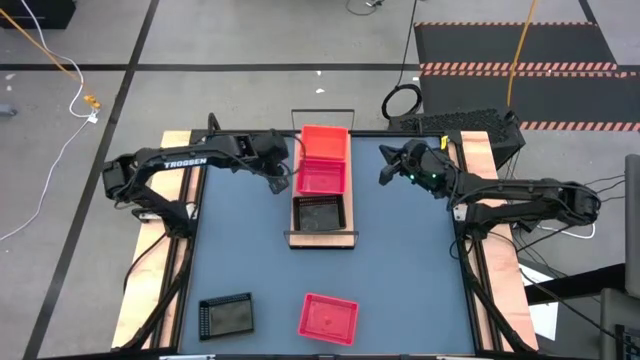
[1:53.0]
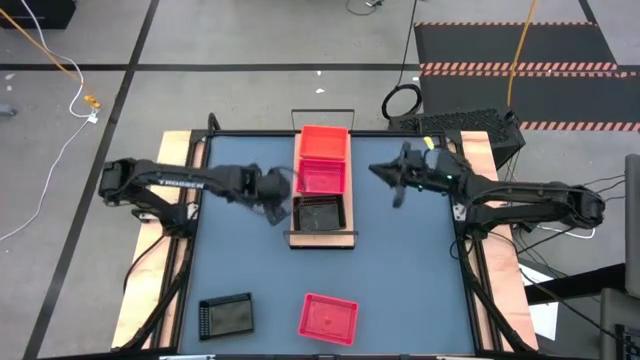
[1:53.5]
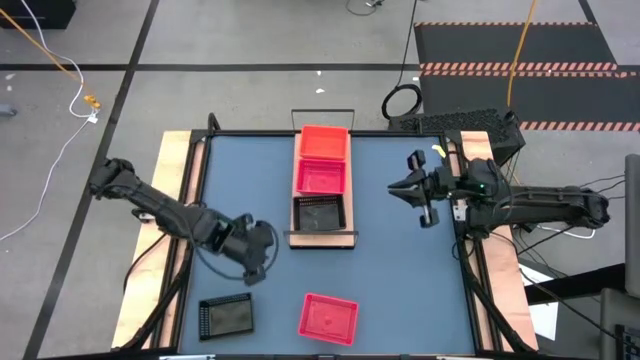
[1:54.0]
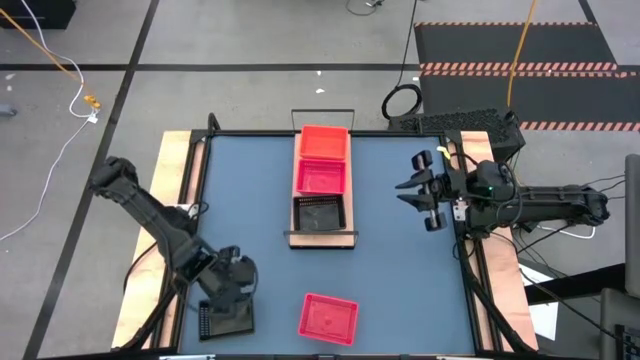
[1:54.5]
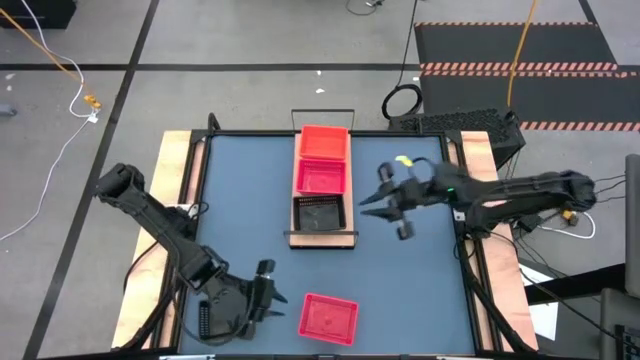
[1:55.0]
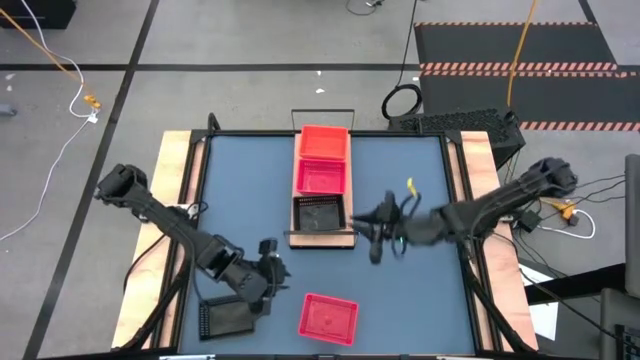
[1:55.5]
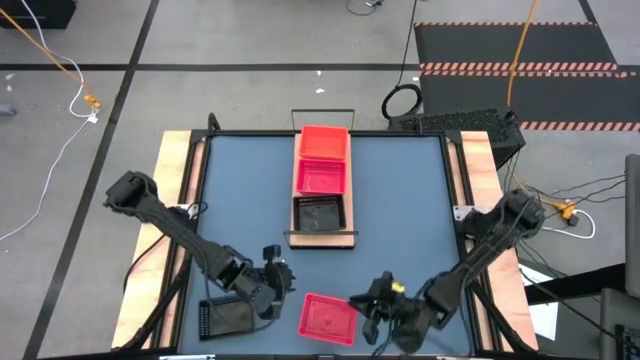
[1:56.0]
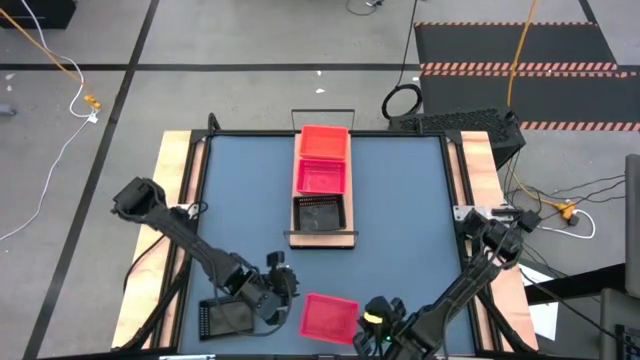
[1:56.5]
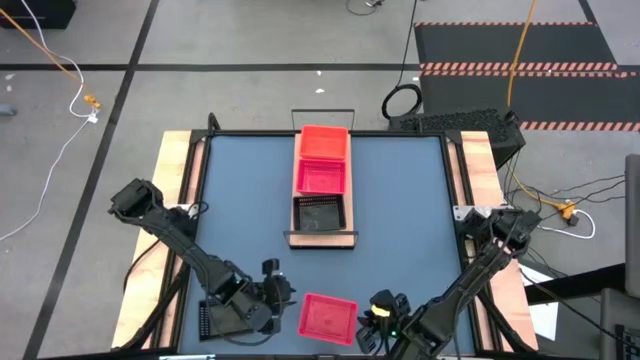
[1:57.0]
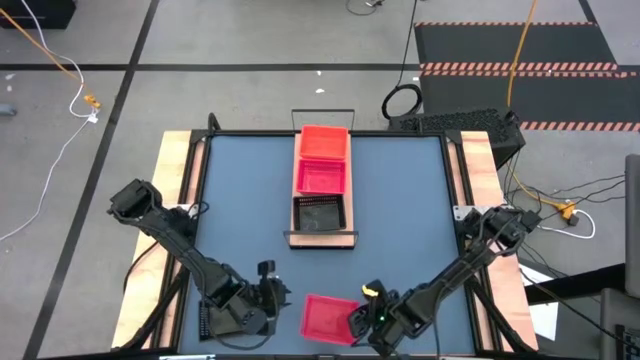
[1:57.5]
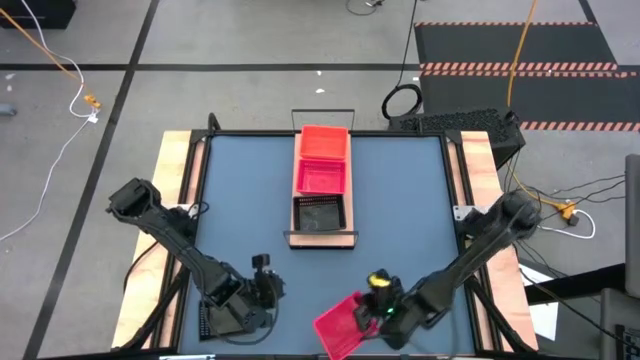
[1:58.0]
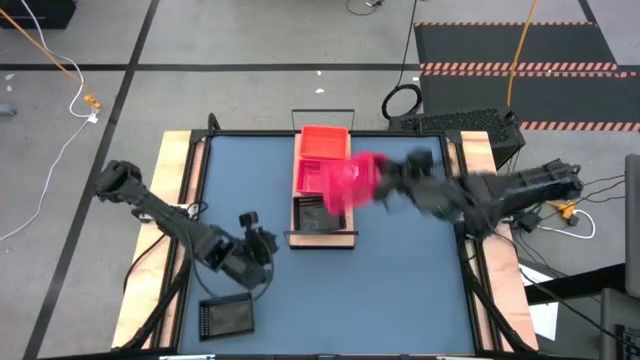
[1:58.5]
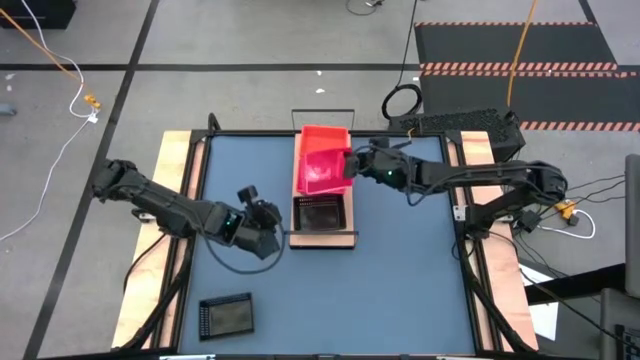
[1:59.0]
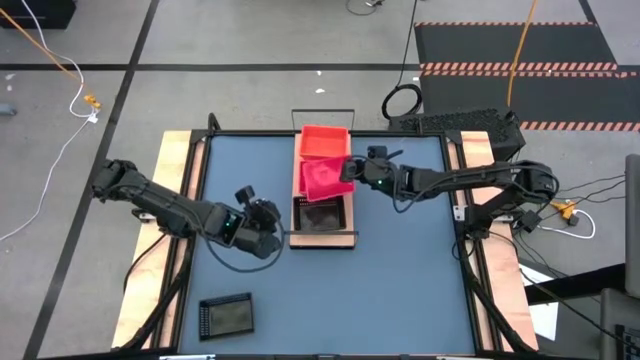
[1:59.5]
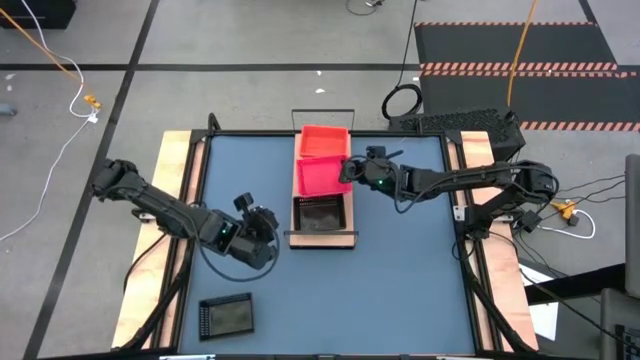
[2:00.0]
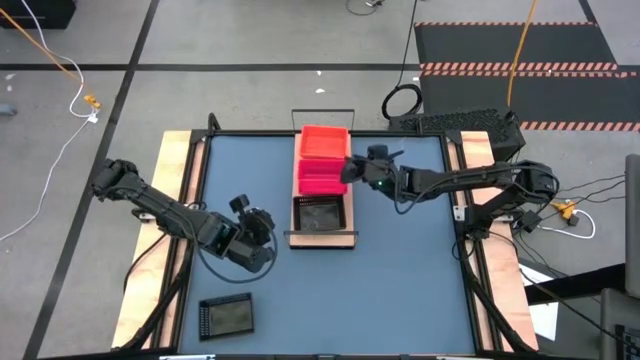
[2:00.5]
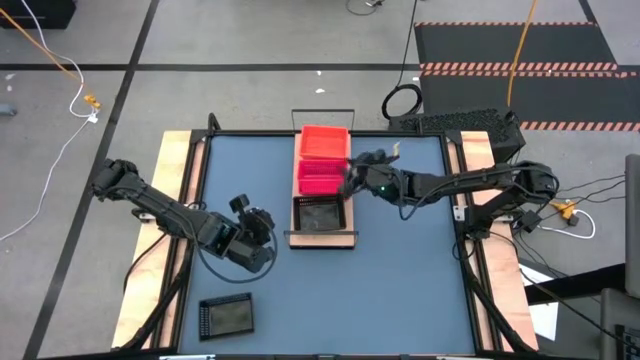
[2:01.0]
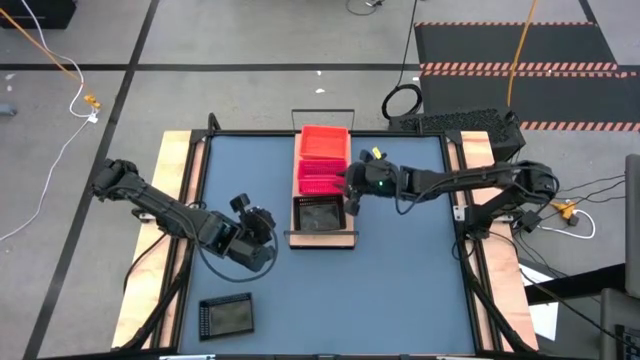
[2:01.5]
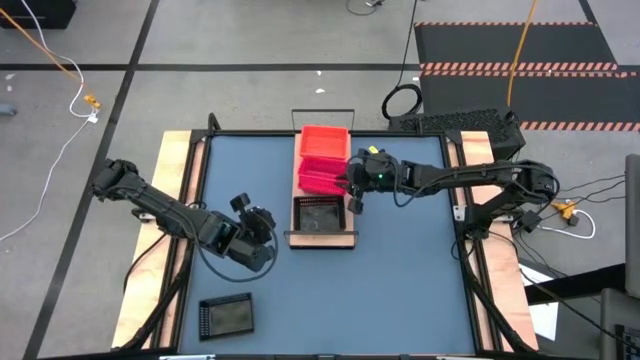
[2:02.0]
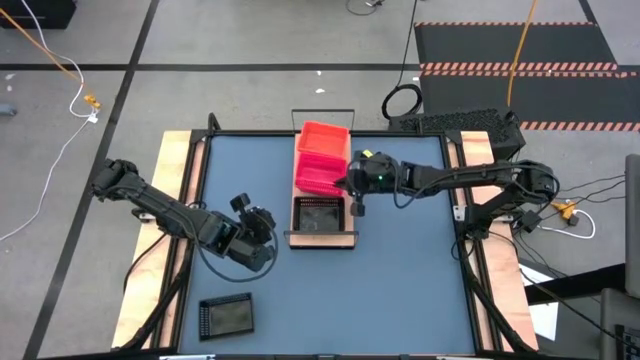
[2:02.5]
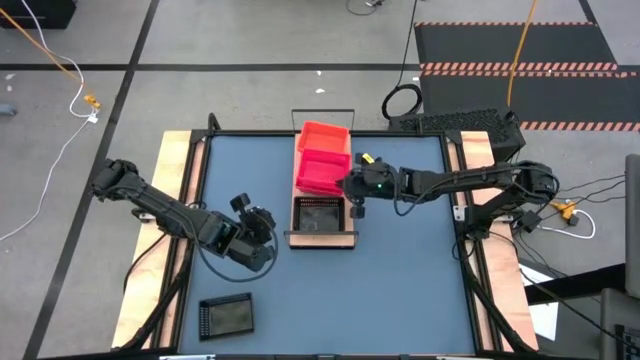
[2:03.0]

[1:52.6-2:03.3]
Task: Stack baskets on shelf by color
Stack the red bin on the stacked red bins on the shelf

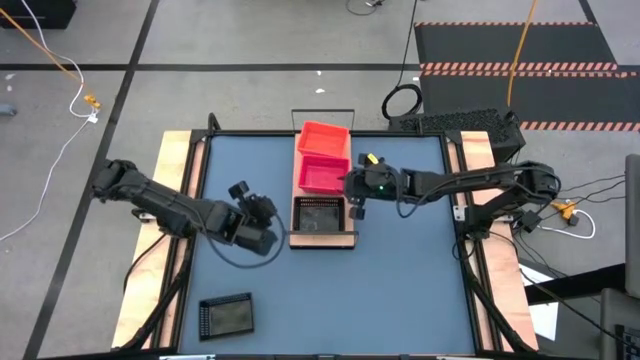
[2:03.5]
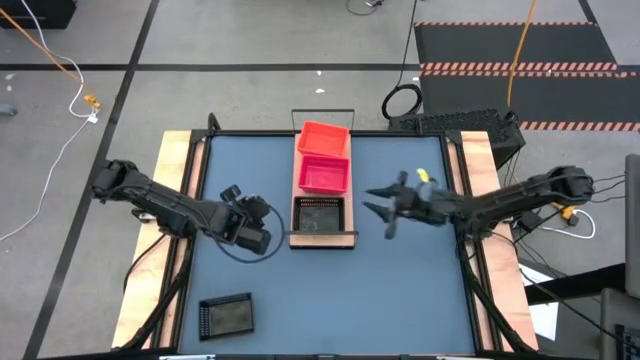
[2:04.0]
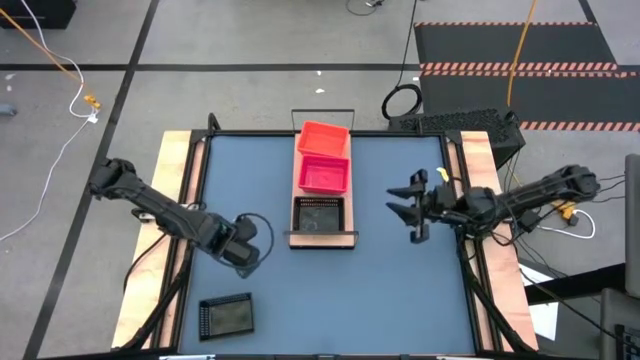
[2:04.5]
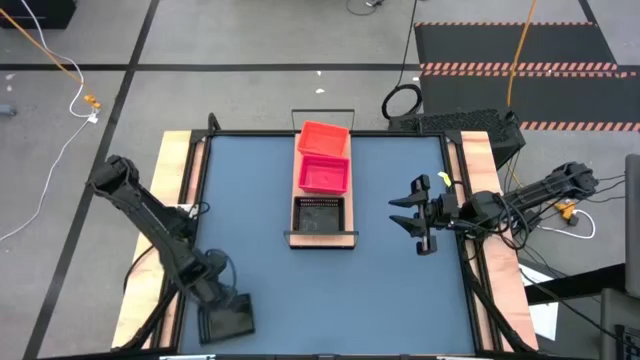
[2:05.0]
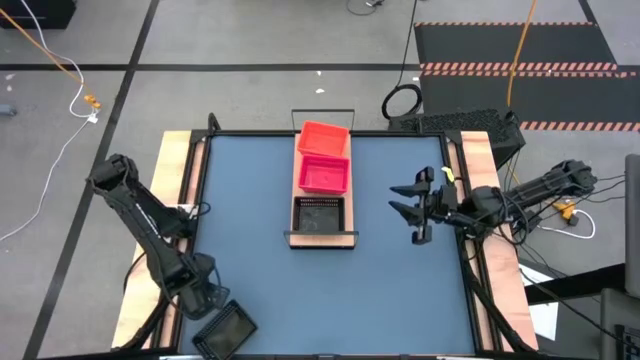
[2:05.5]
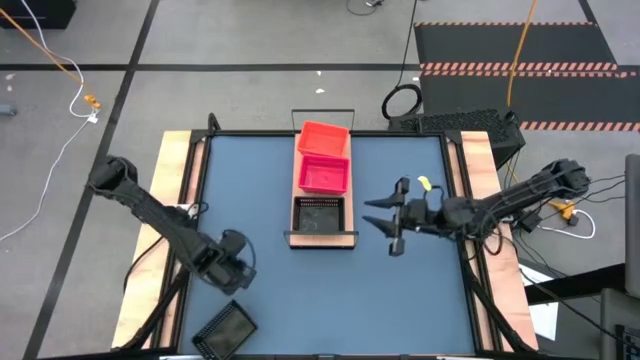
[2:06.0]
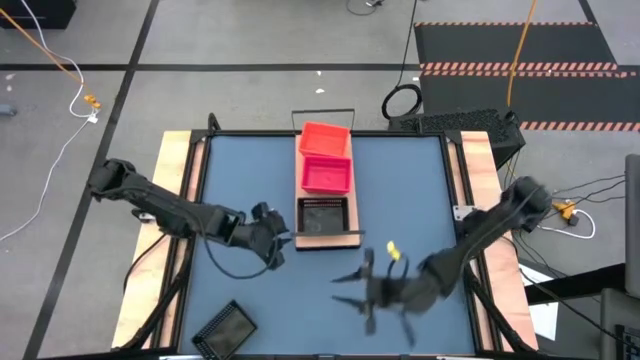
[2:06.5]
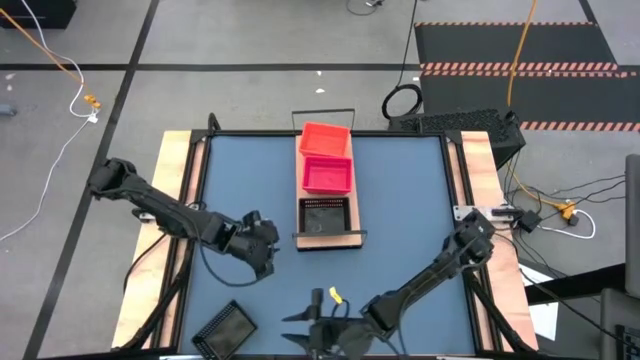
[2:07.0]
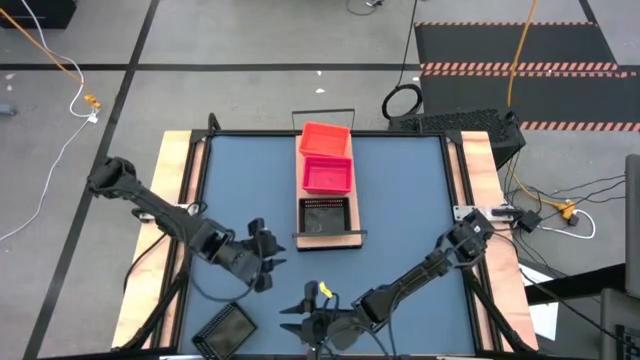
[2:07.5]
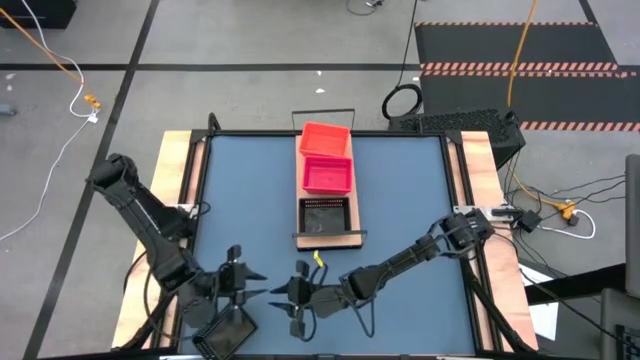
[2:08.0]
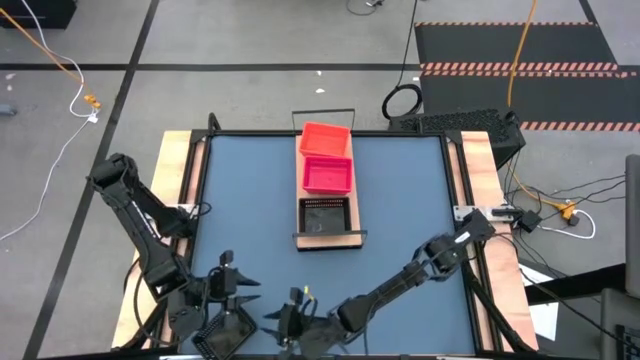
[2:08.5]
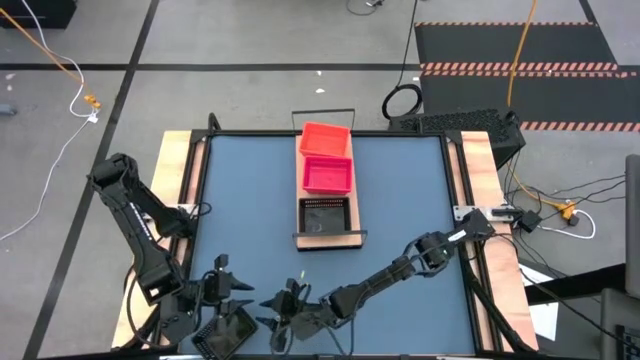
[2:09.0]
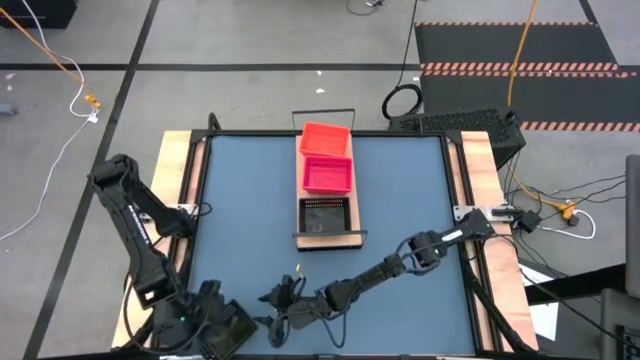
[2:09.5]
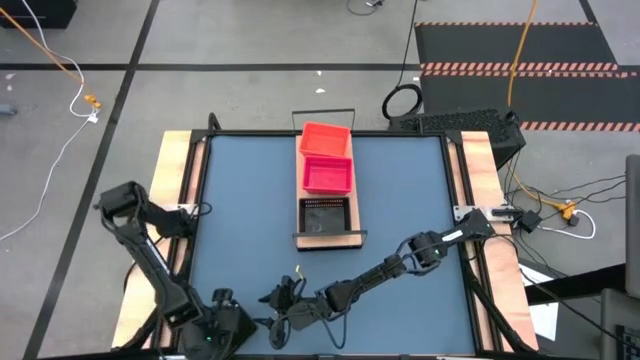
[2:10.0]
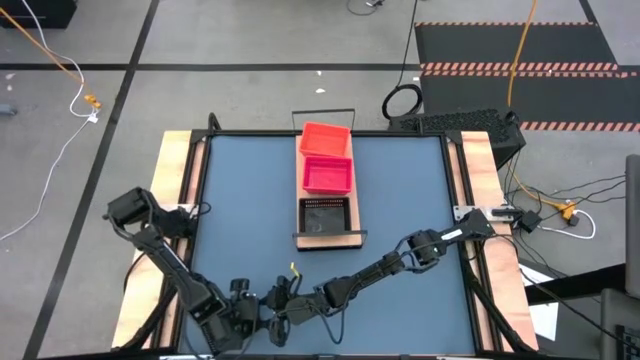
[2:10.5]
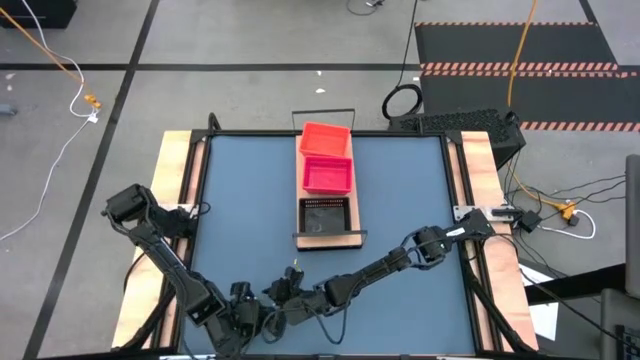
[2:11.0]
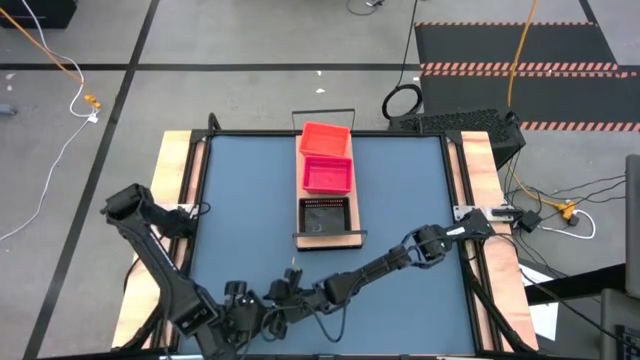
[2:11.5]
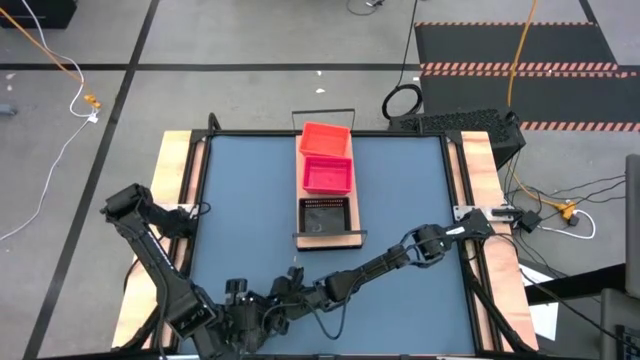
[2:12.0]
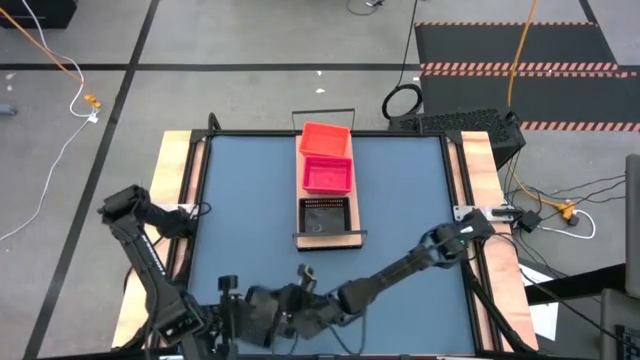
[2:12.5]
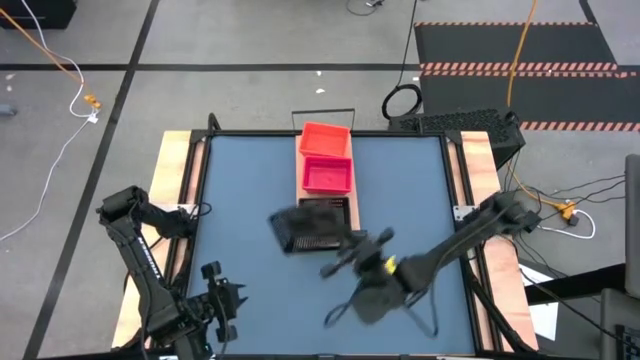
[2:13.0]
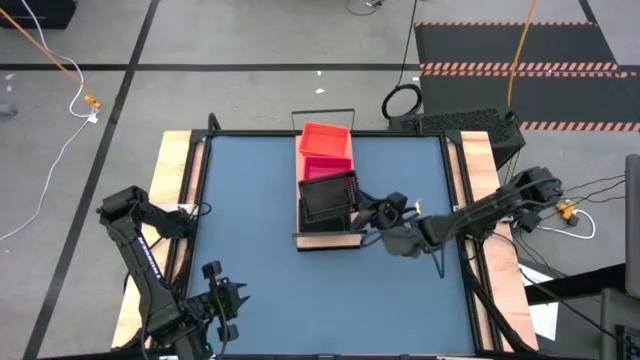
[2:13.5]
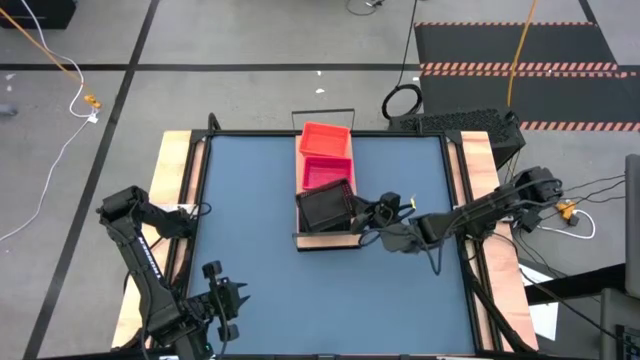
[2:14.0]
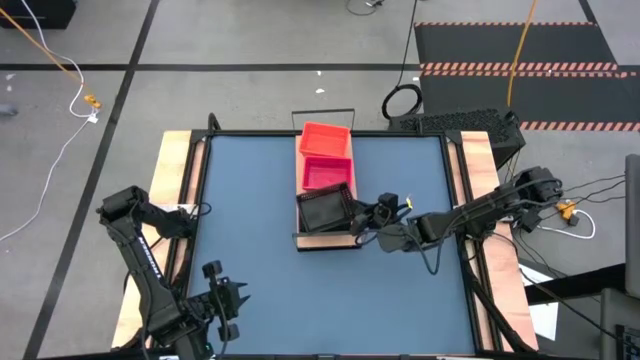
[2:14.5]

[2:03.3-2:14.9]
Stack the black bin on the stacked black bins on the shelf
